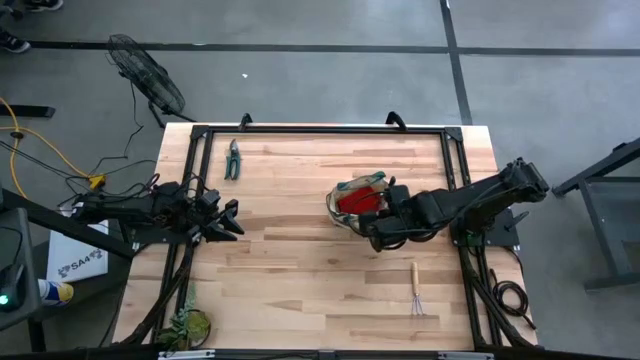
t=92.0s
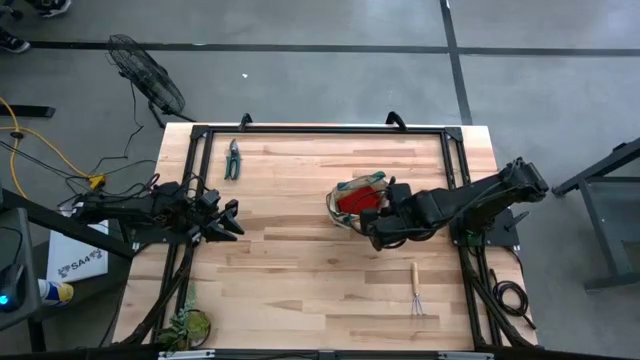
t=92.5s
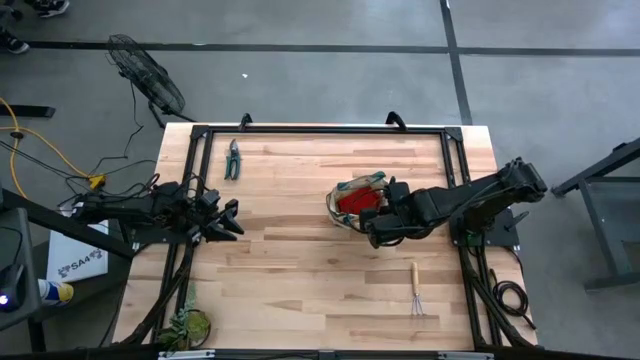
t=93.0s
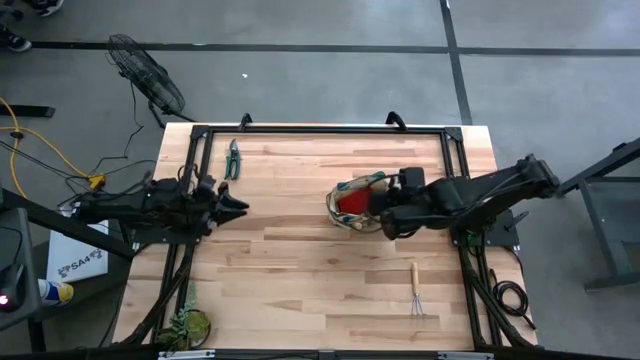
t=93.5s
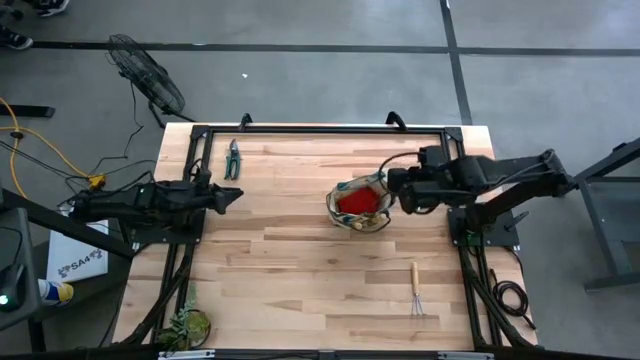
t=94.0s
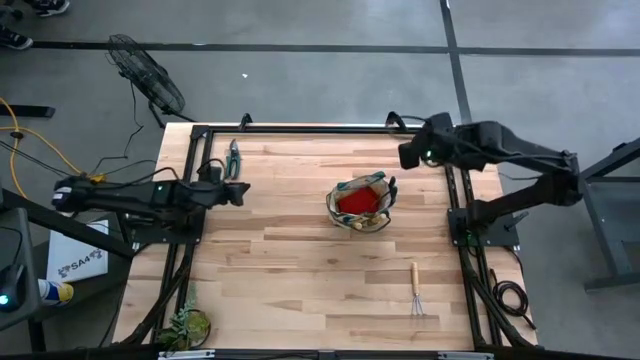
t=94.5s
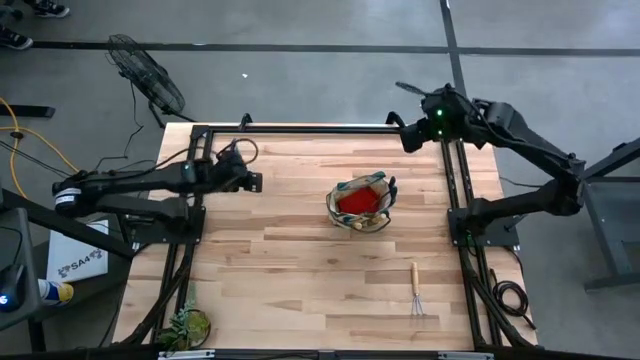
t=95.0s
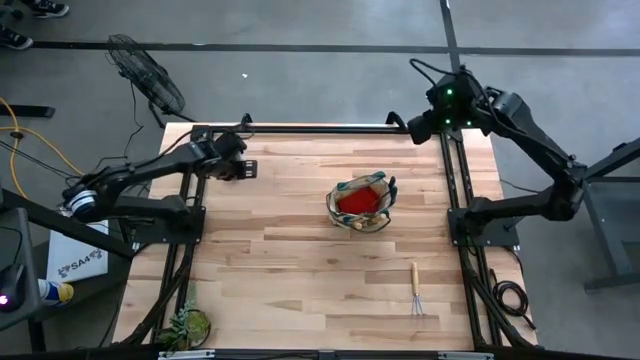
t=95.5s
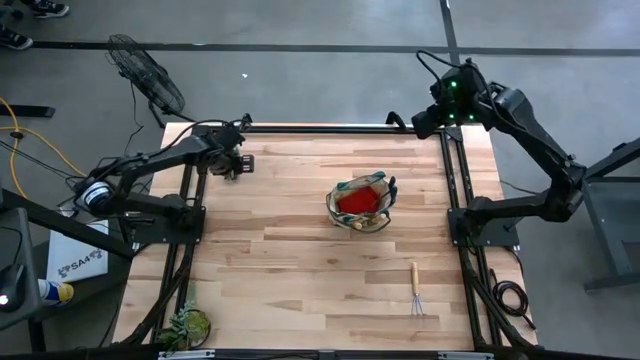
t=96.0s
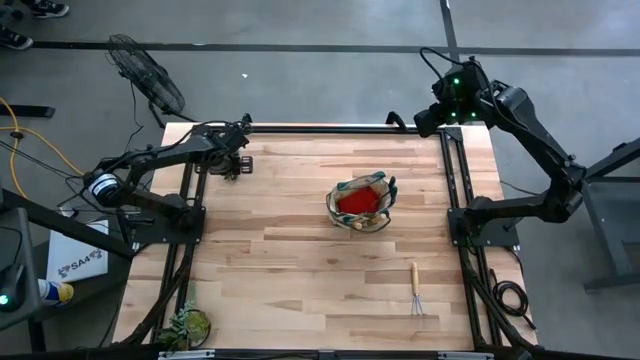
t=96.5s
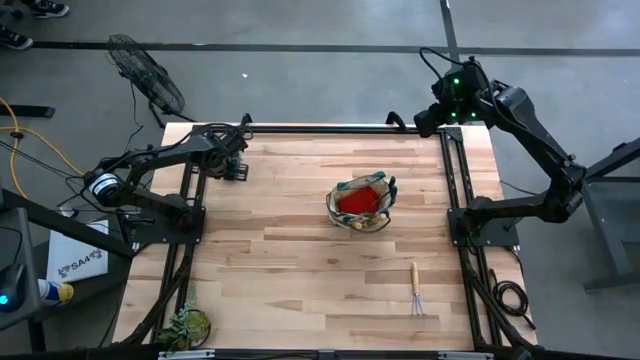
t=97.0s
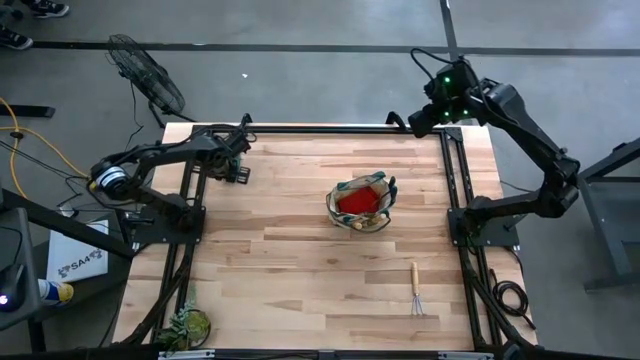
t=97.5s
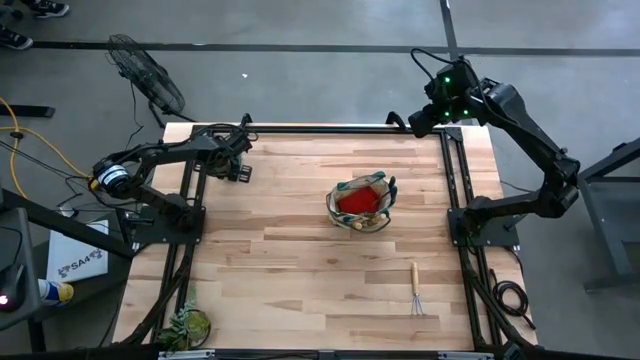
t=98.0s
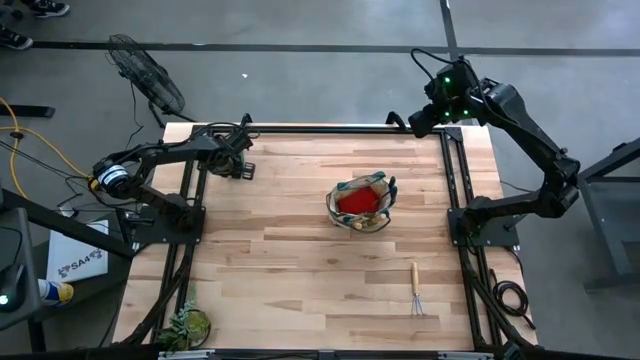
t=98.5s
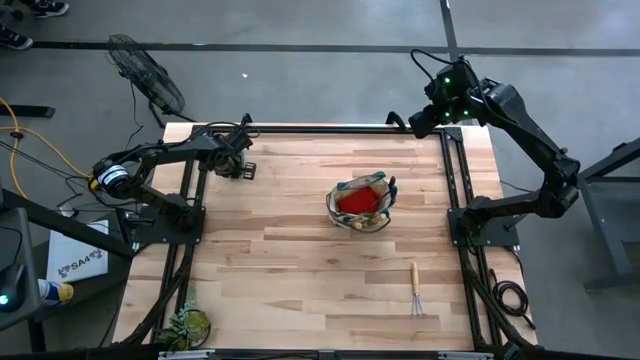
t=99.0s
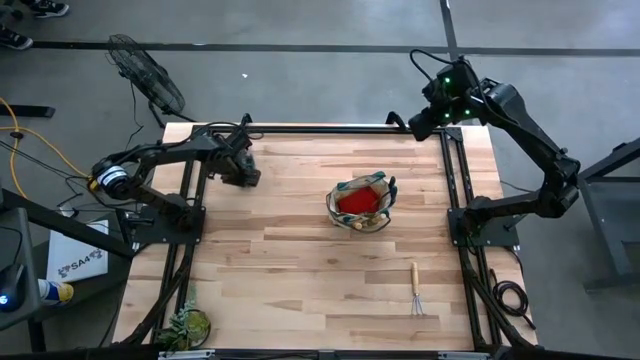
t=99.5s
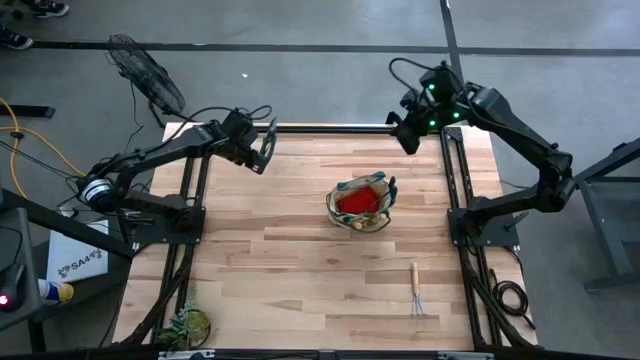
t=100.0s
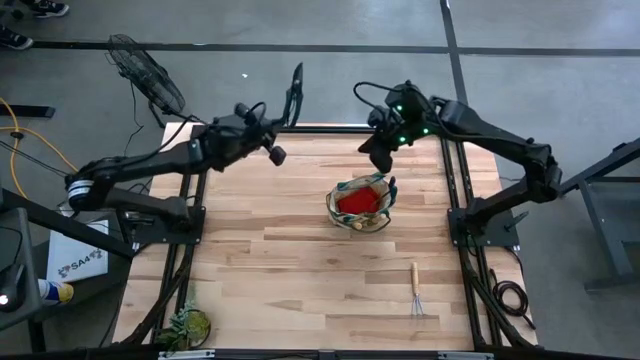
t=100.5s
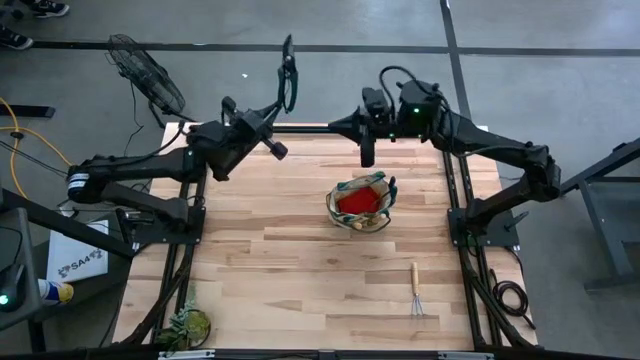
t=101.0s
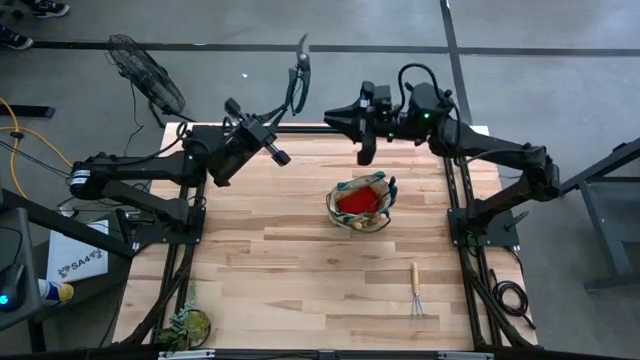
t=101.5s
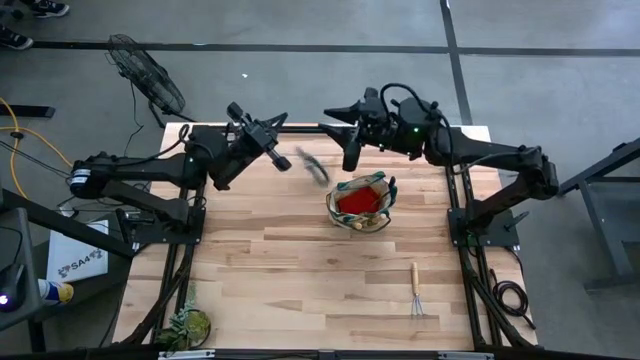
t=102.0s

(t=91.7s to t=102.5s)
Task: Pick & Place Garden tools in Gardening bag
Put the shear scissor into the gardening bag

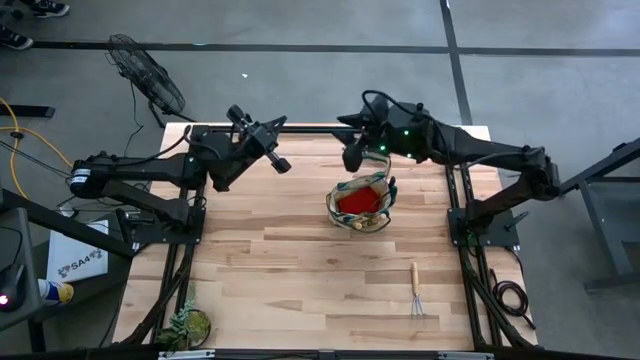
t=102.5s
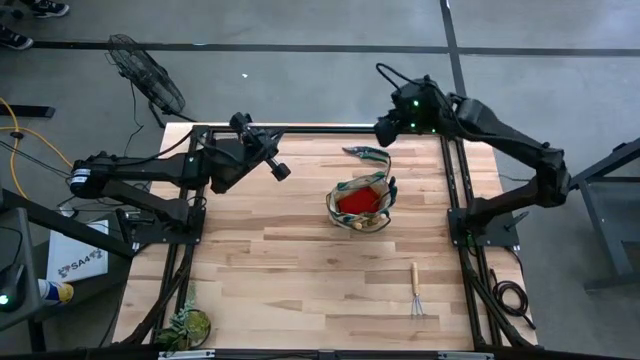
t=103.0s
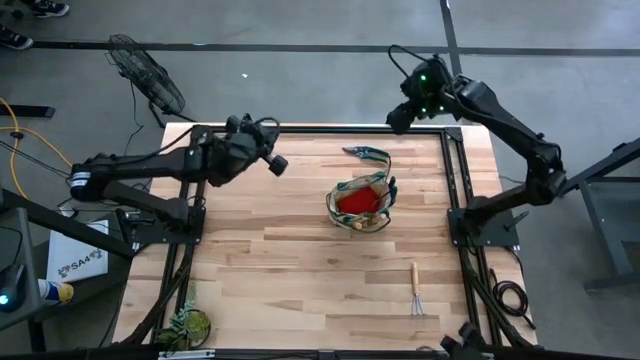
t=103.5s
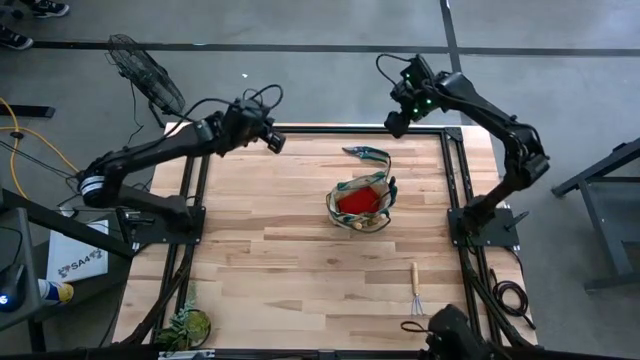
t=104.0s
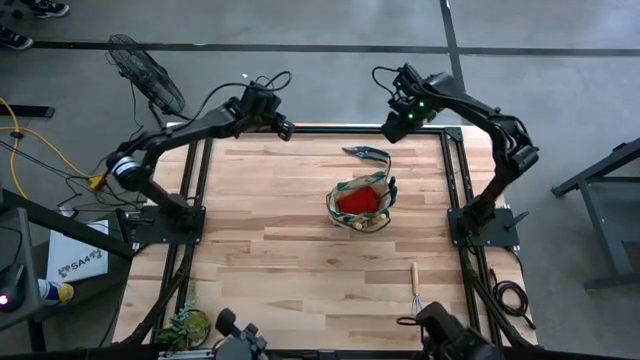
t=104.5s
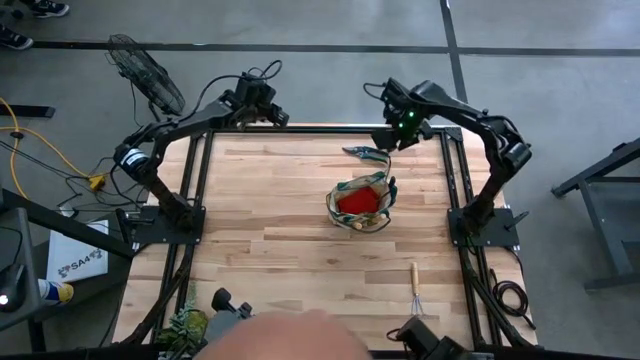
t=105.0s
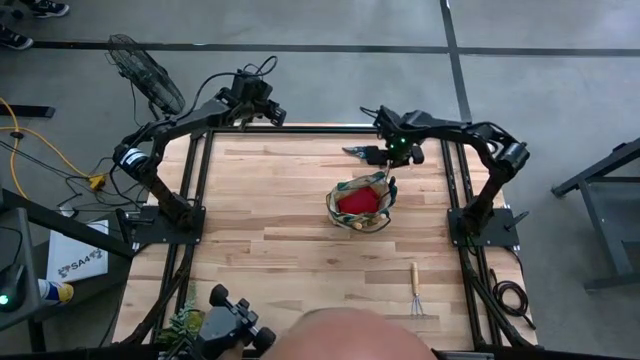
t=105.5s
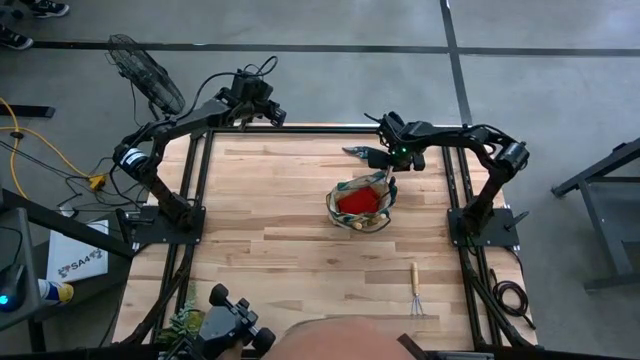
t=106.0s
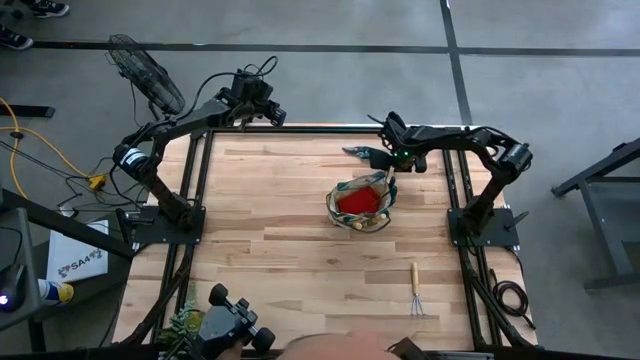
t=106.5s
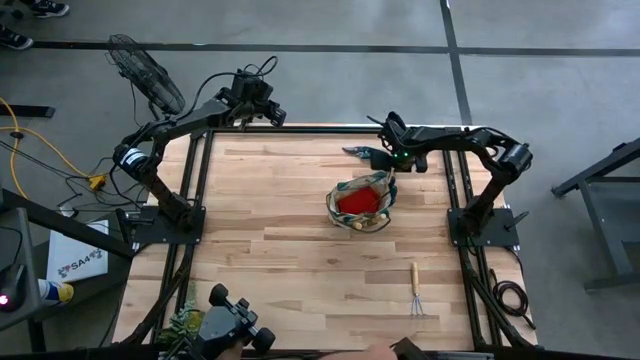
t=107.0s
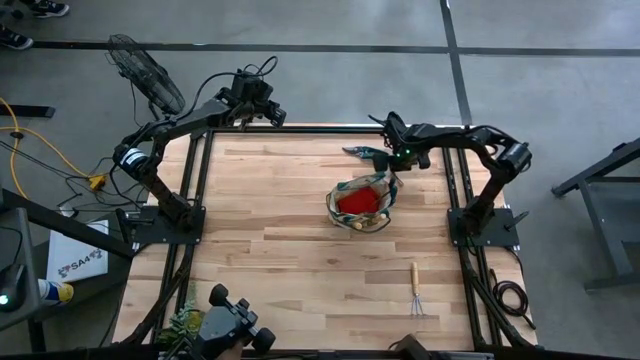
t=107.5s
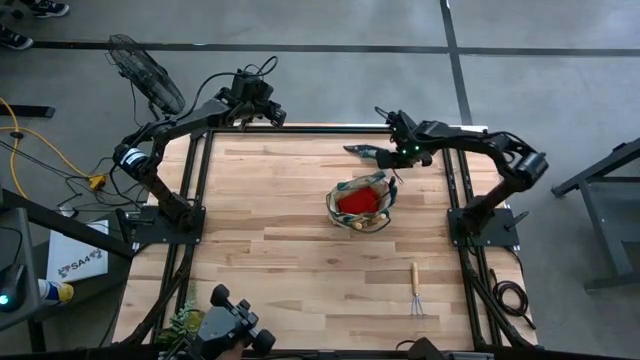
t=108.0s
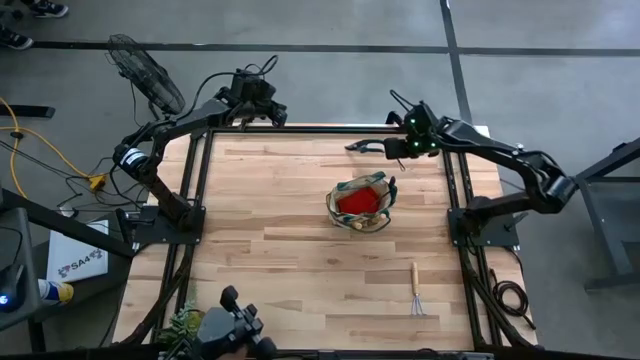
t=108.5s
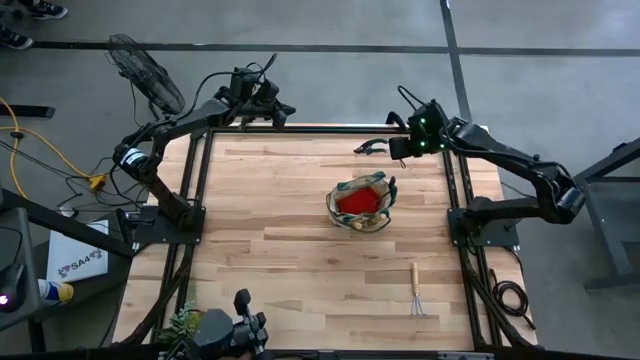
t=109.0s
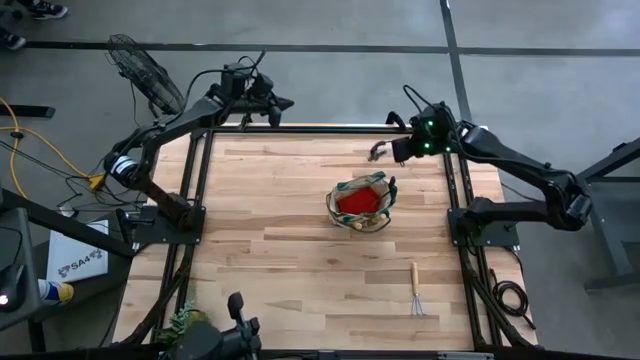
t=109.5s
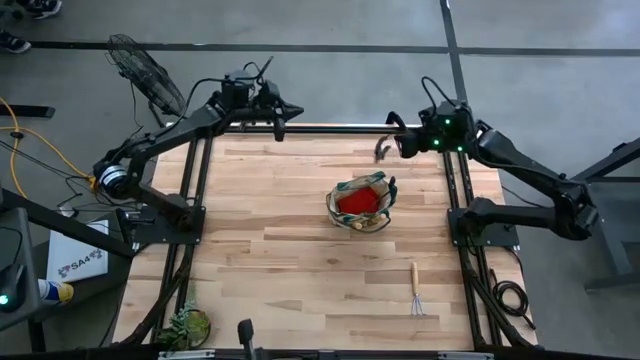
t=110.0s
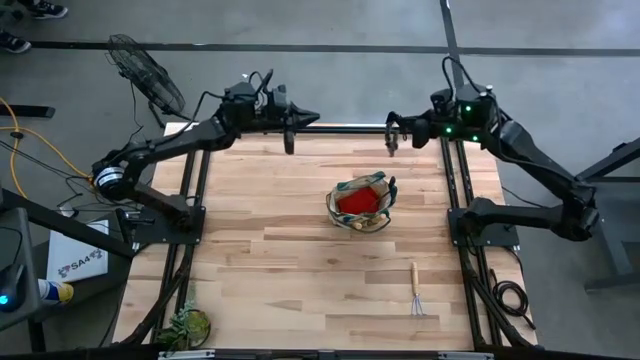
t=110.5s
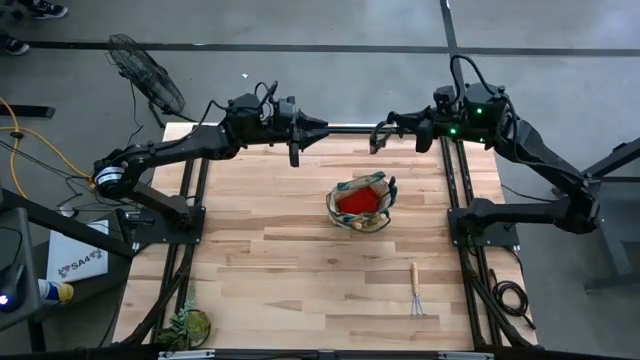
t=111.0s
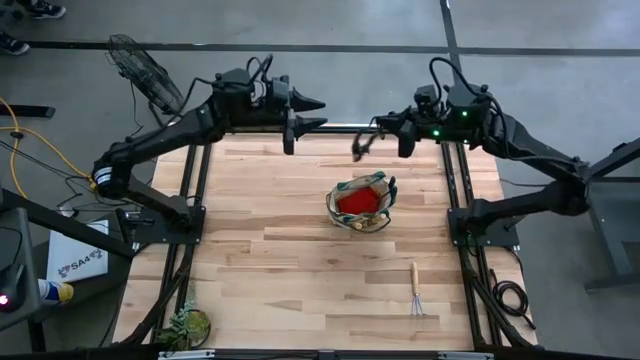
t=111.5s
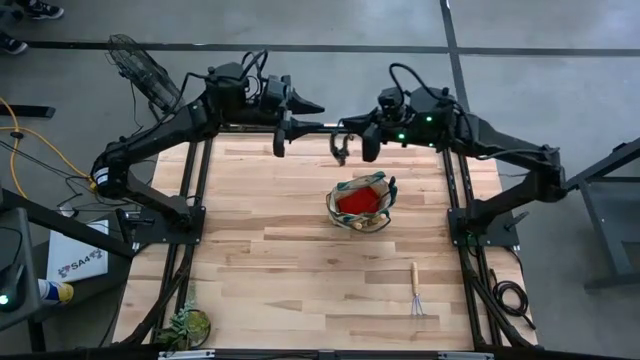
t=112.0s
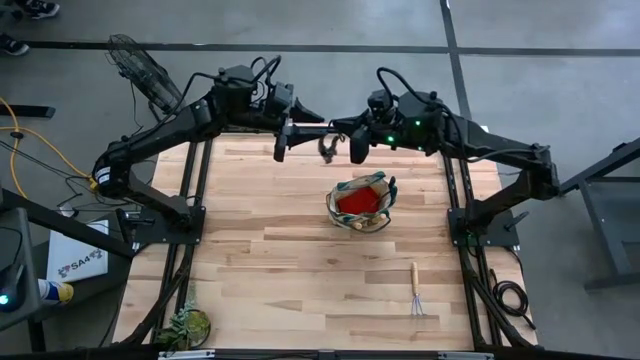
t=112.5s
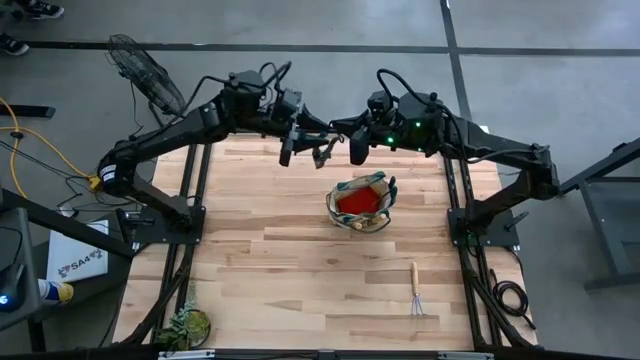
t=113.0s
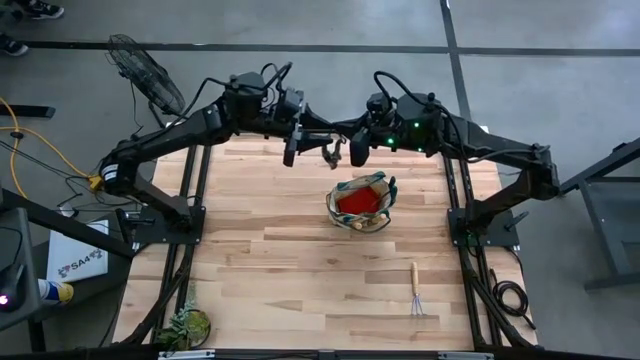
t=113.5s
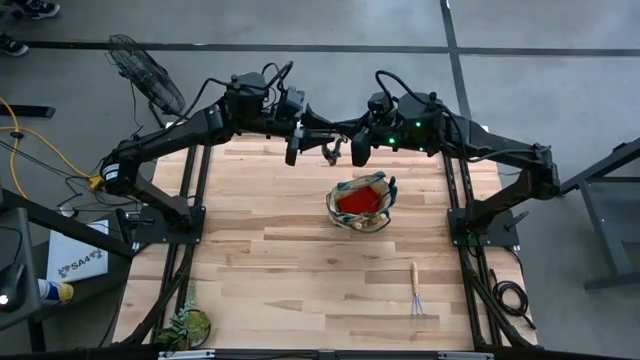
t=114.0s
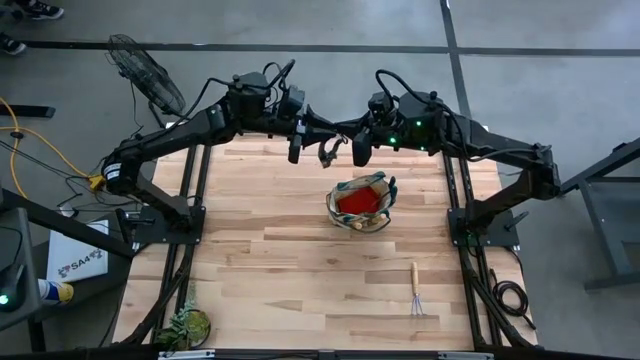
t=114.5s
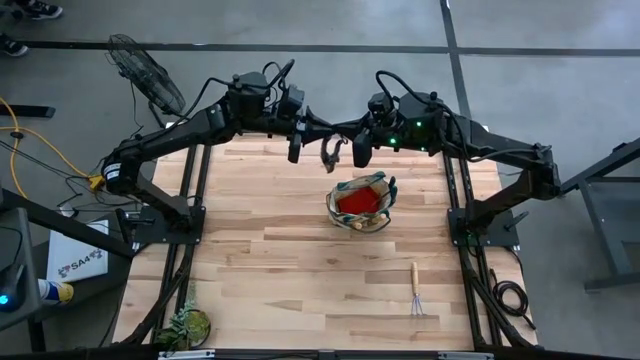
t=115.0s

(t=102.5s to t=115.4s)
Put the shear scissor into the gardening bag
